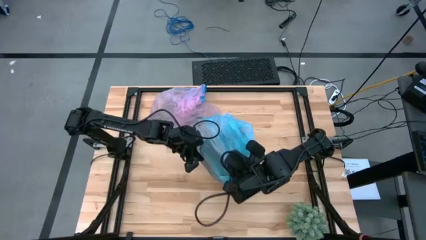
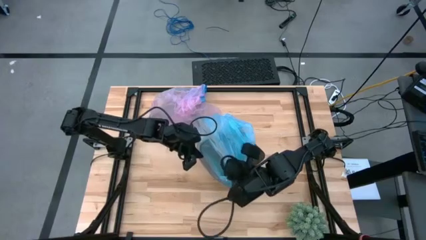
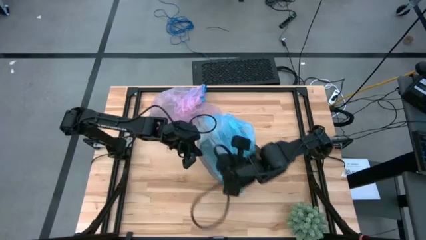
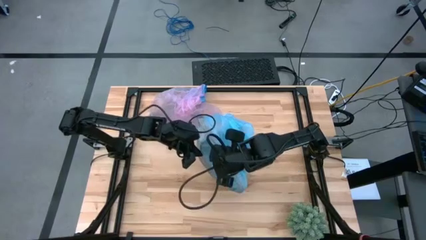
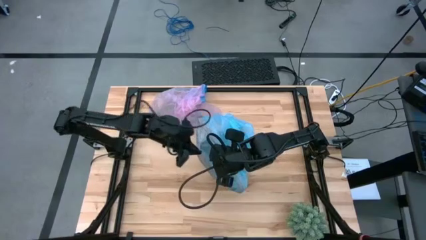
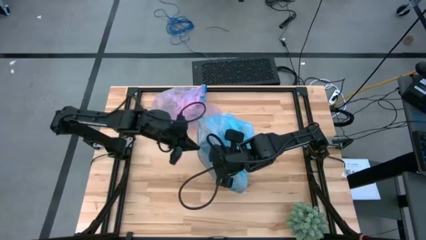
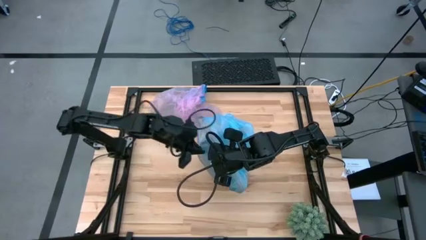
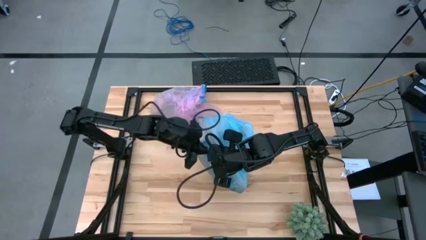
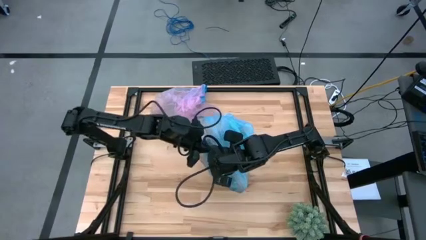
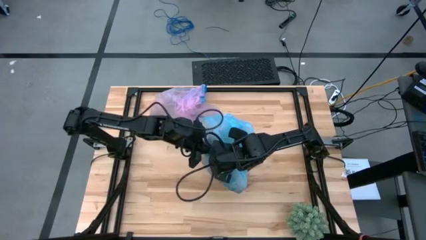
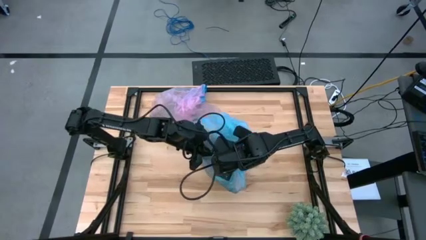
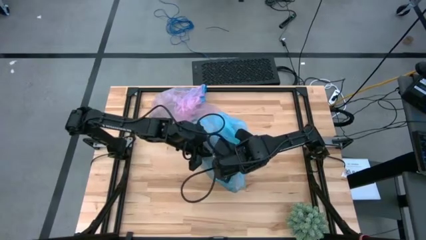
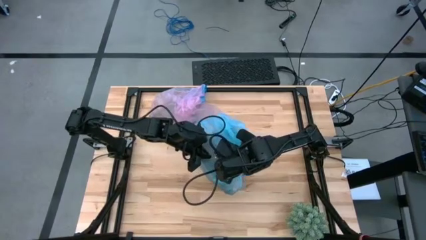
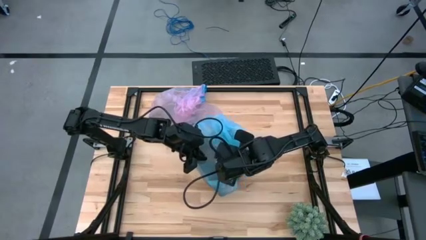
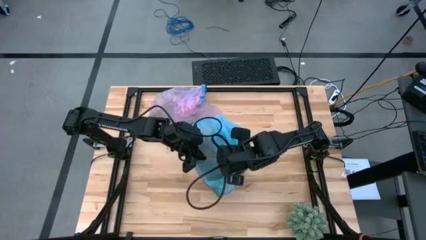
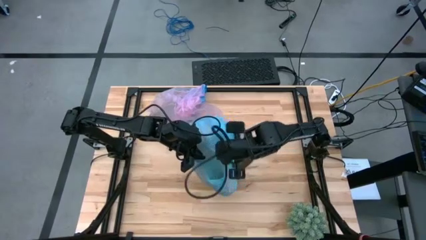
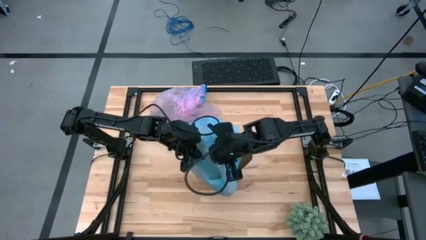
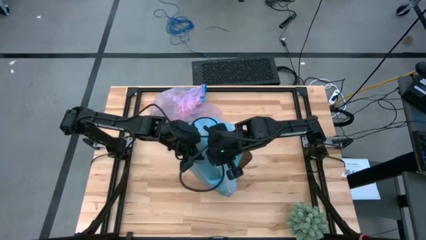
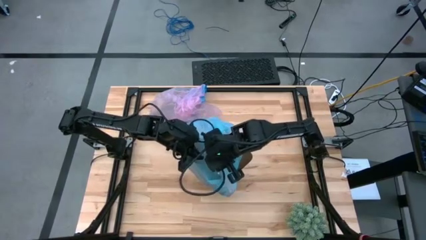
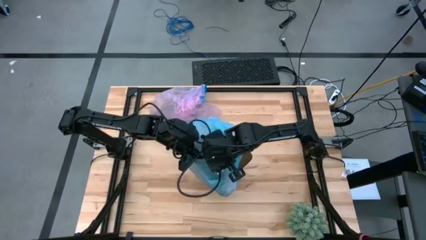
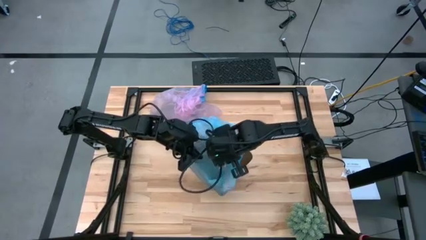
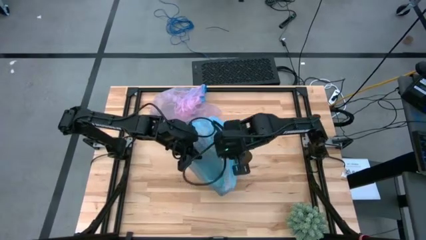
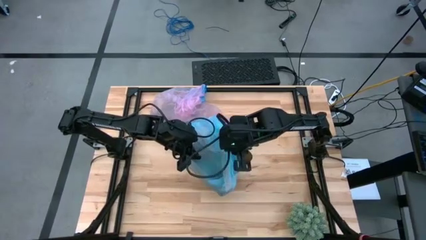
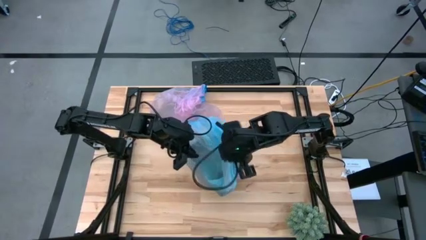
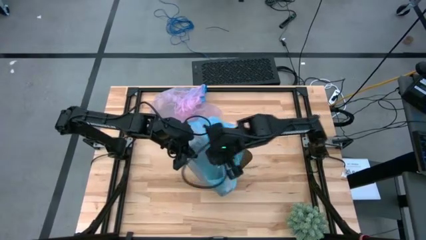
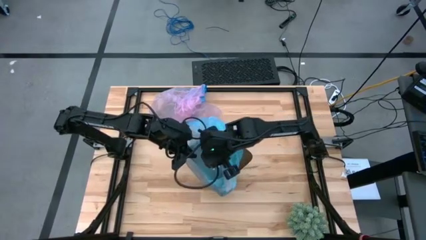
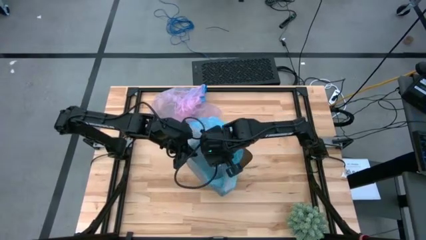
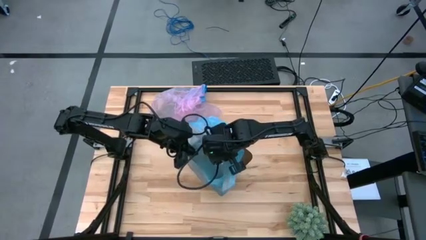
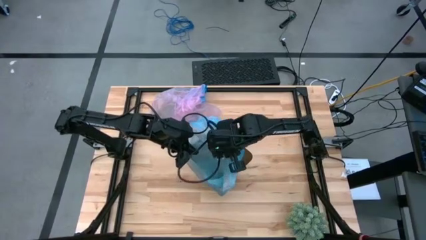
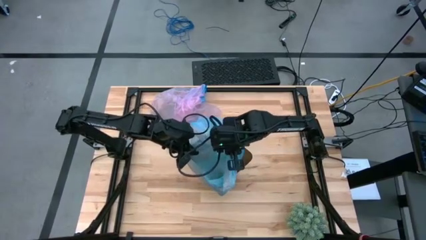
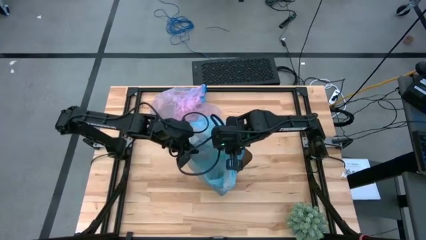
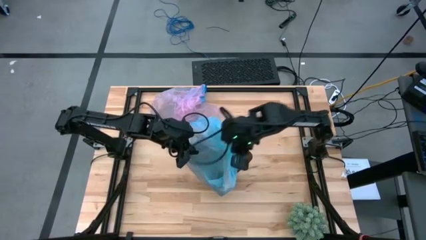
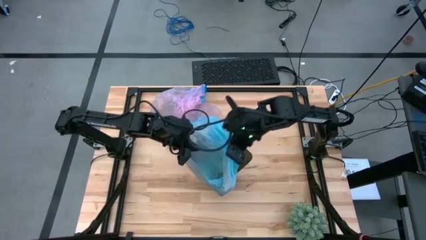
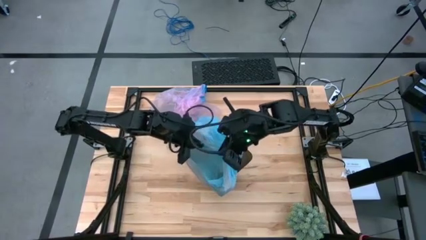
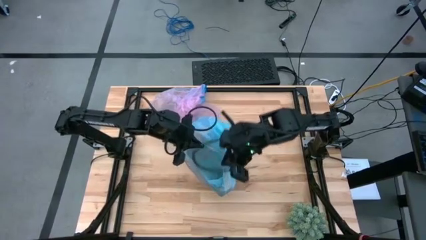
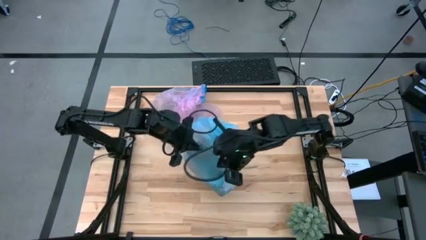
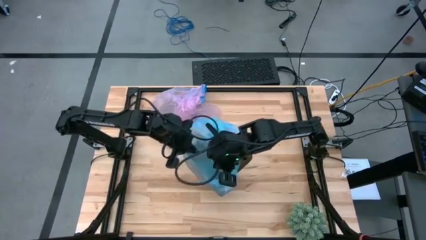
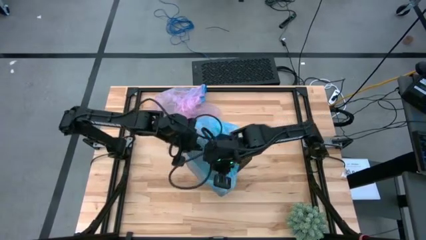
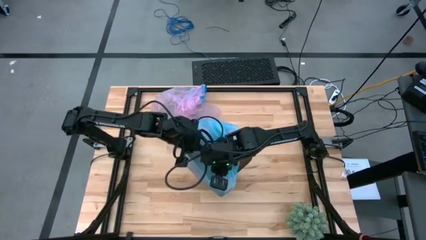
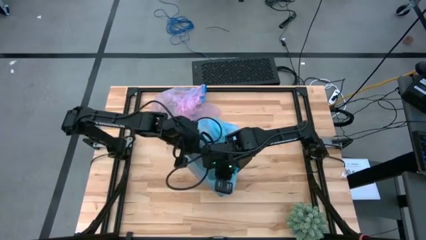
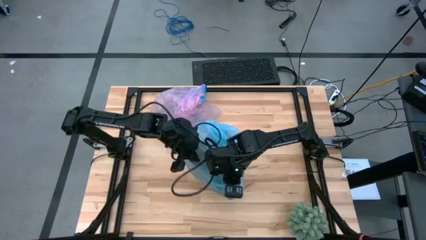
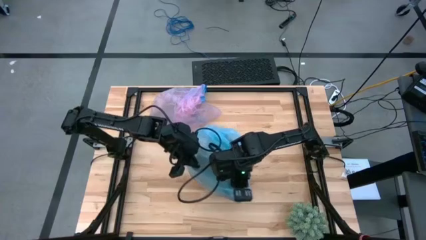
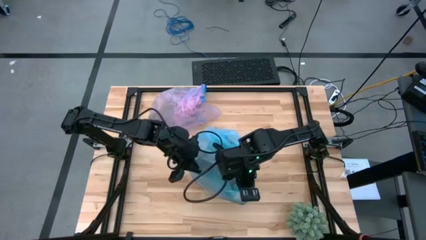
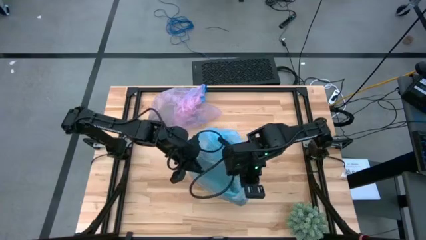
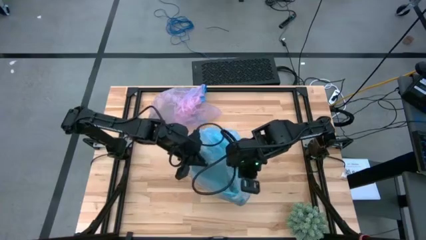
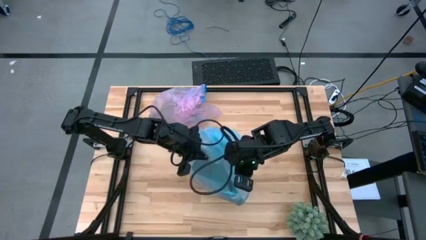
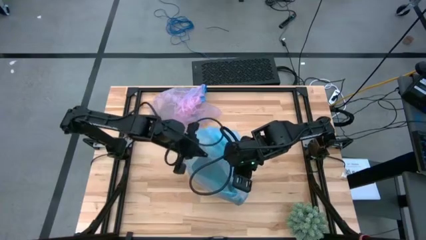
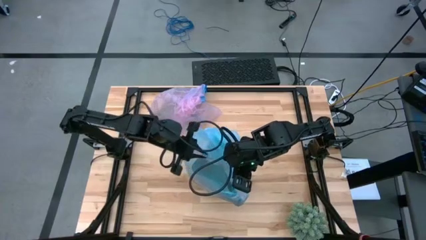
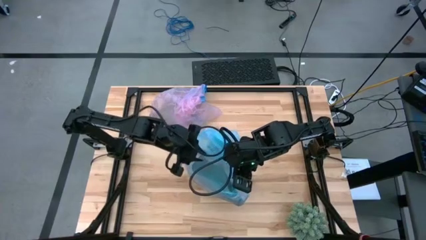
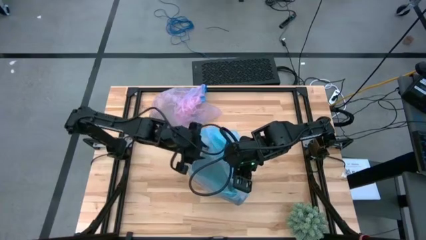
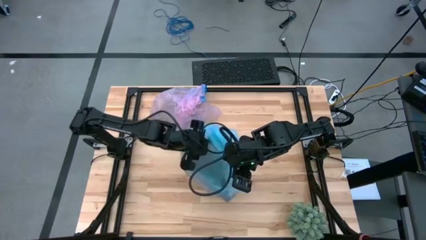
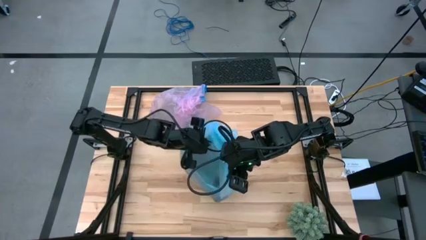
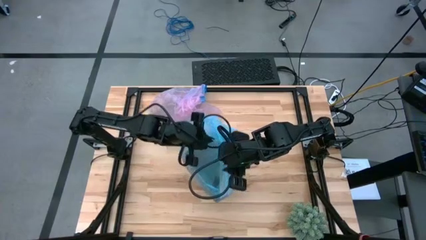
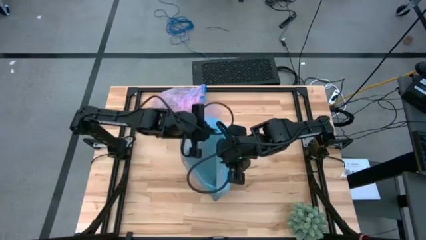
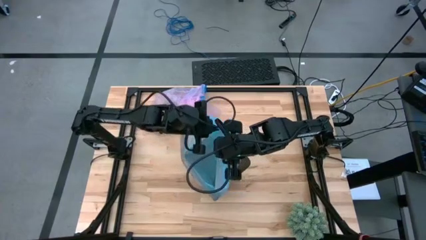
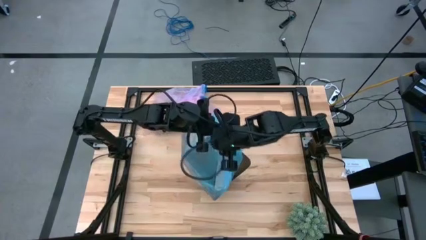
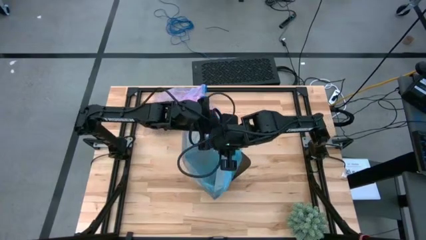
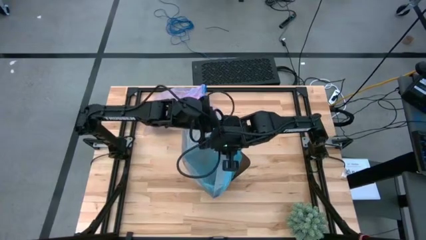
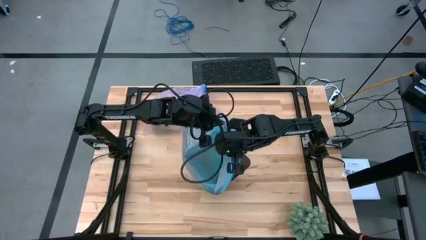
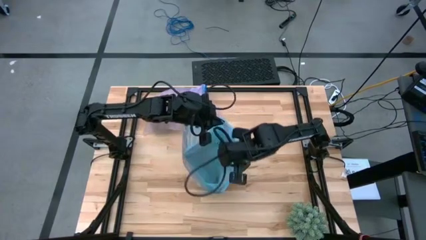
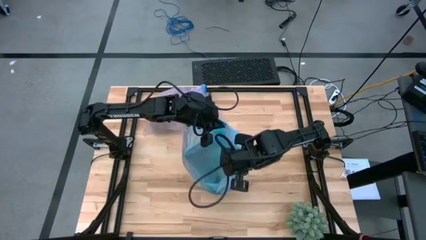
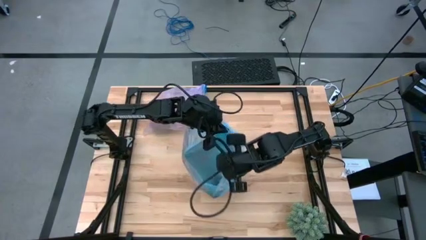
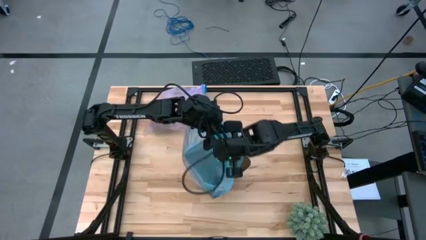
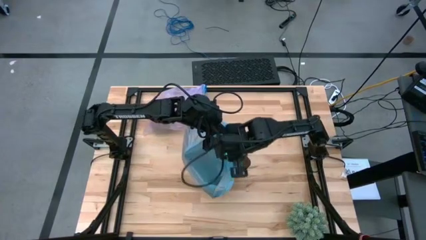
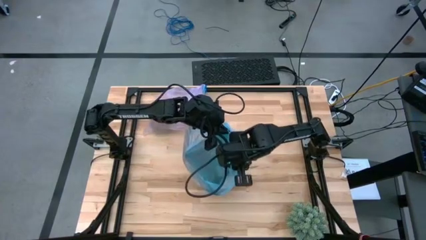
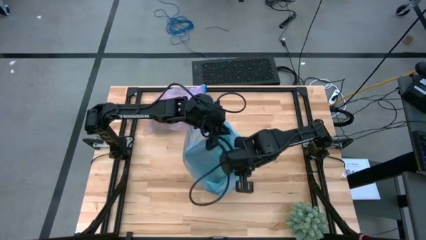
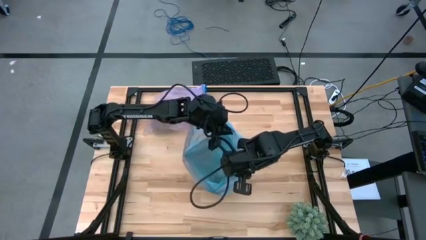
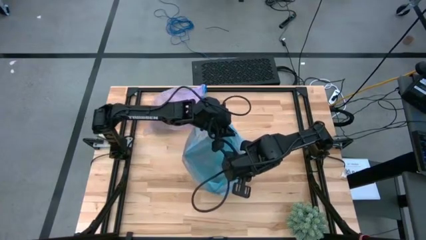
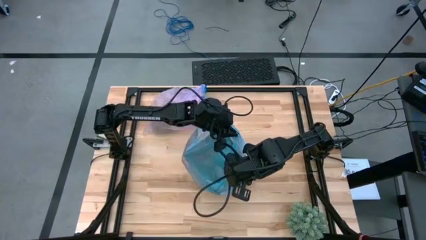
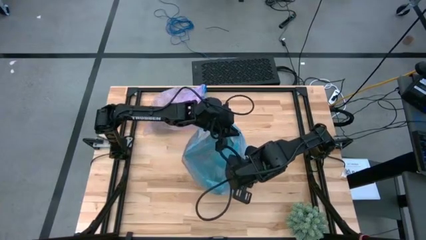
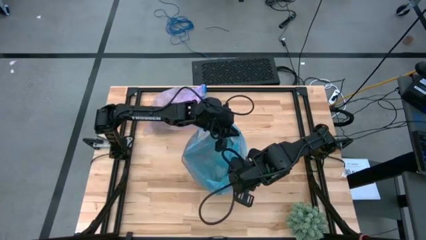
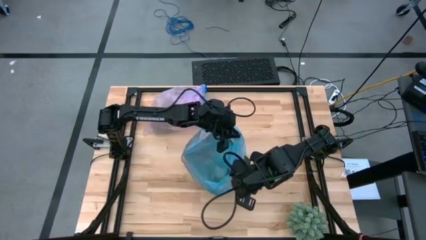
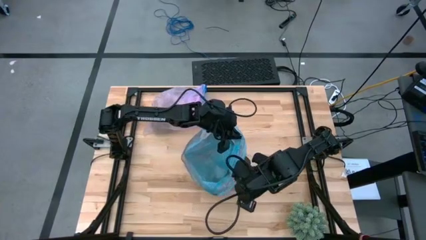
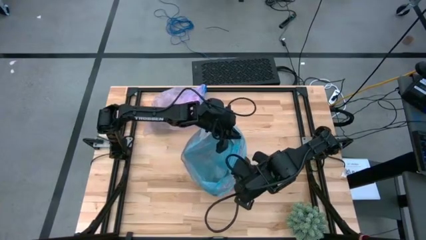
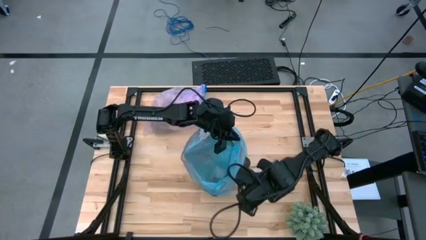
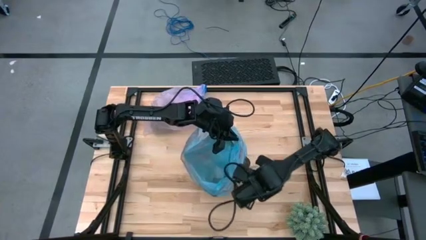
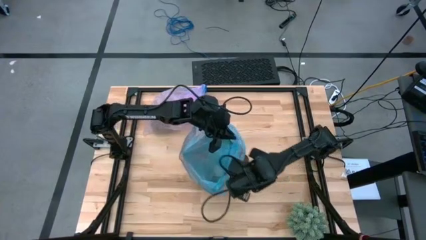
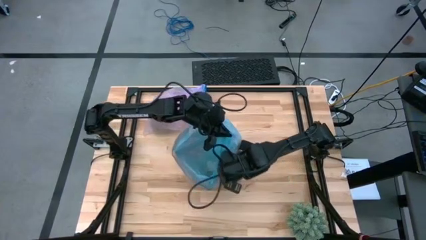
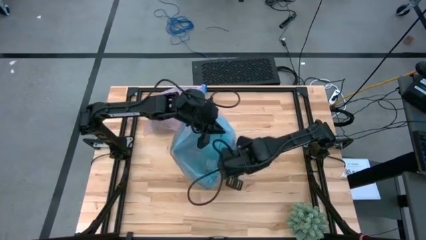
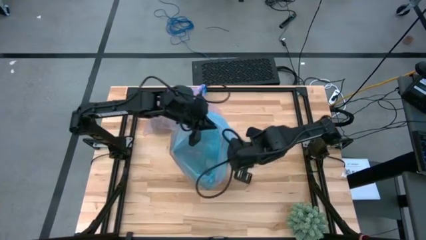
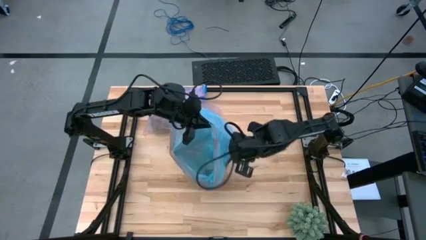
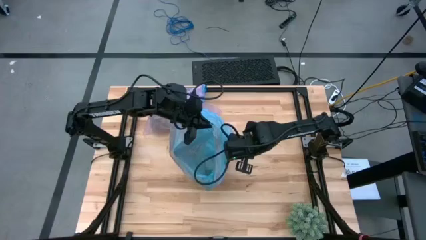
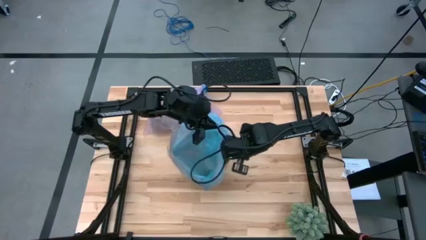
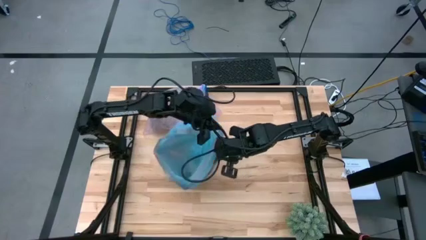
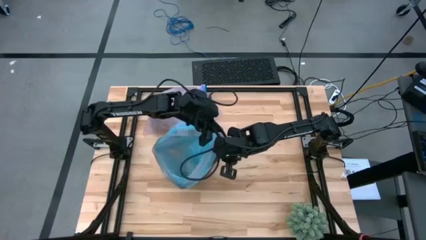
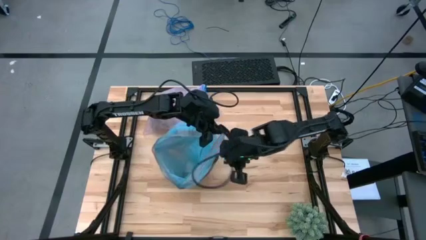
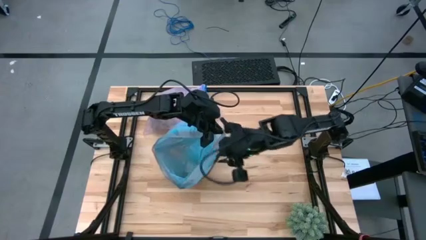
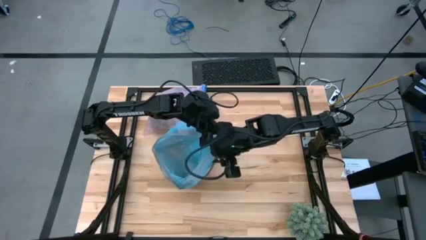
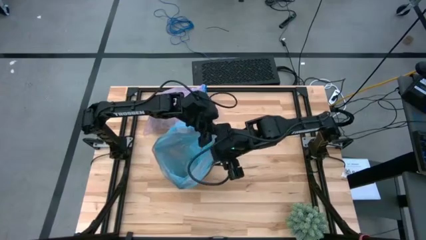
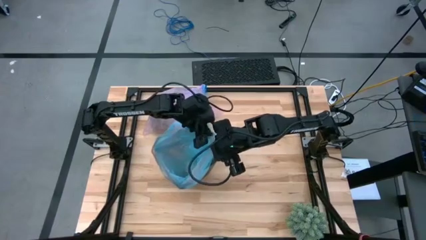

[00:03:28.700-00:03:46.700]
Task: place trash/remove bag and relplace
Insert the new trash bag into the trash bin
